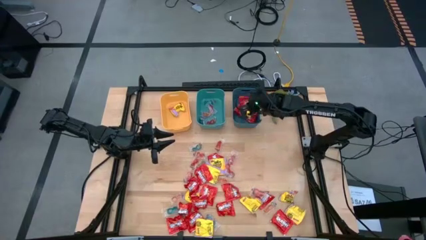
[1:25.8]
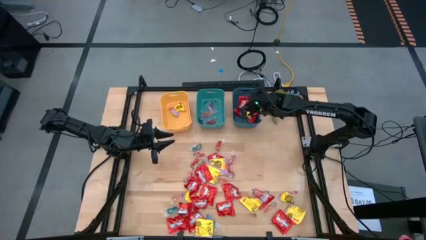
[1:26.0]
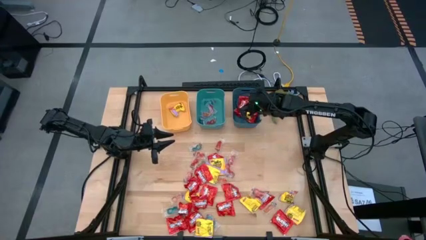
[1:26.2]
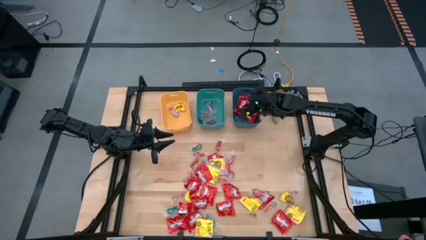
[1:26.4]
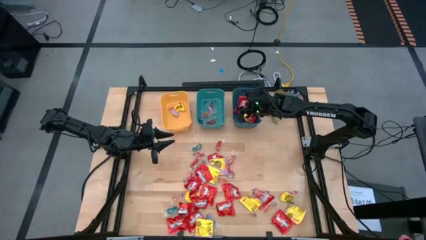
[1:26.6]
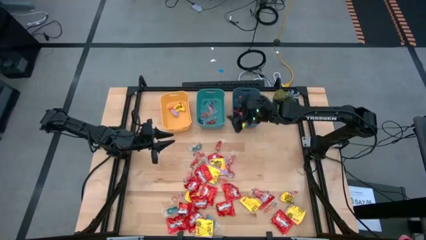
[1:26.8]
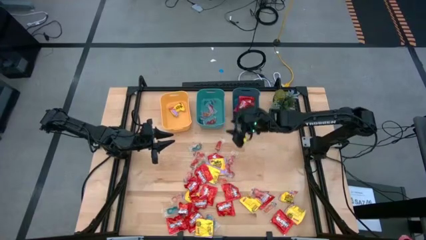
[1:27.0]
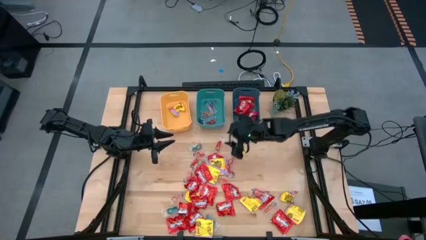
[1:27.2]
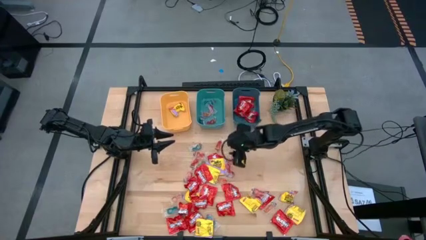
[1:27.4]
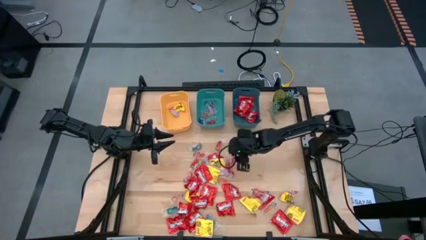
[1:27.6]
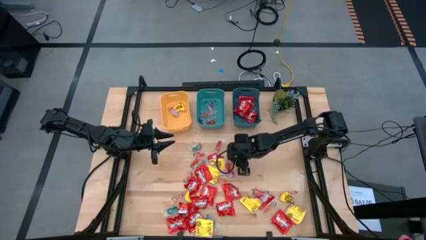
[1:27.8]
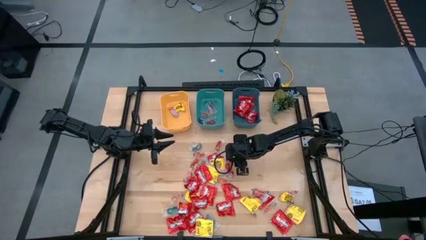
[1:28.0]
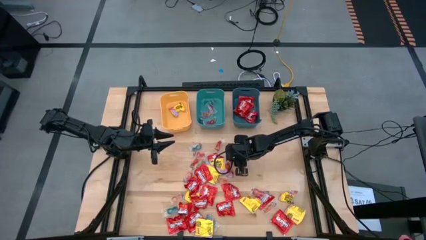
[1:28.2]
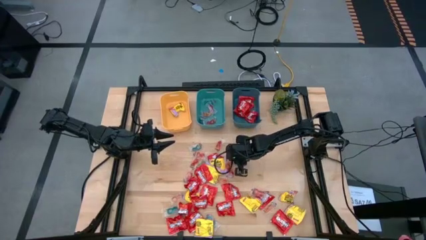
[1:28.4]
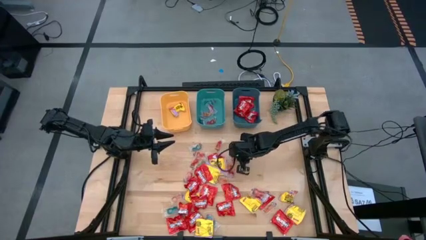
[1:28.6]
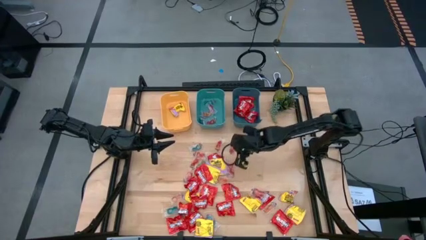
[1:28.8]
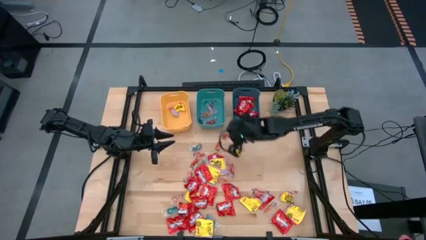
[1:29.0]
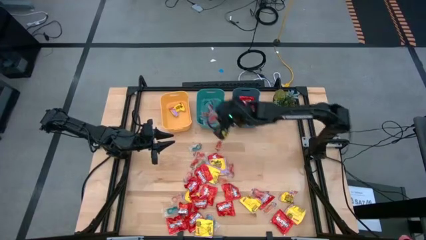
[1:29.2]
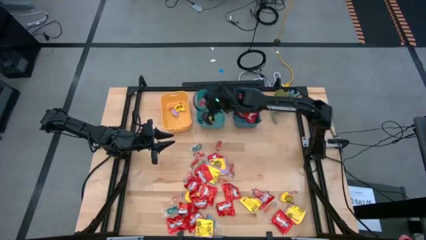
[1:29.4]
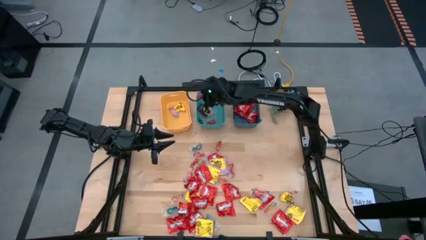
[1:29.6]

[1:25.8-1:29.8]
Task: Sort candy
Put the orange gummy candy into the green bin

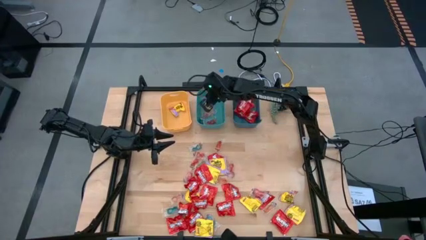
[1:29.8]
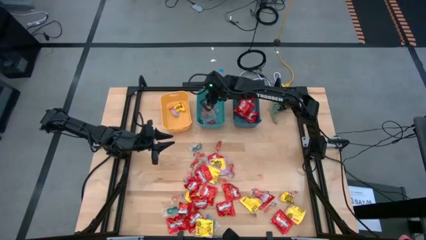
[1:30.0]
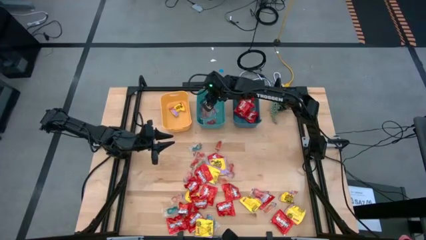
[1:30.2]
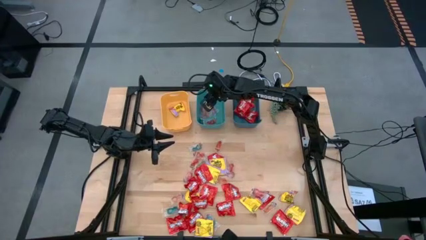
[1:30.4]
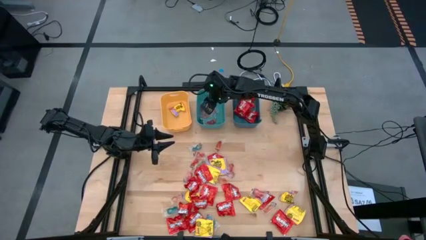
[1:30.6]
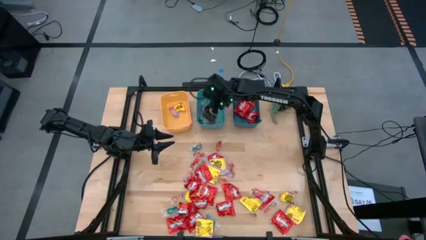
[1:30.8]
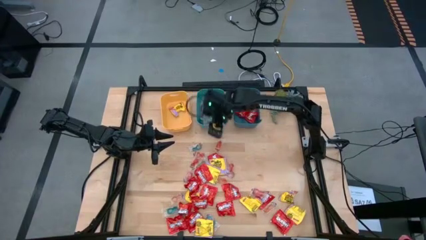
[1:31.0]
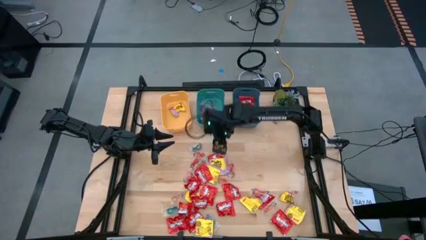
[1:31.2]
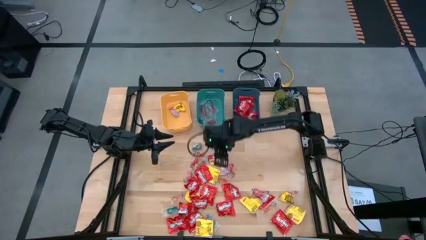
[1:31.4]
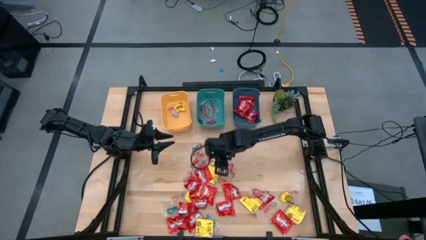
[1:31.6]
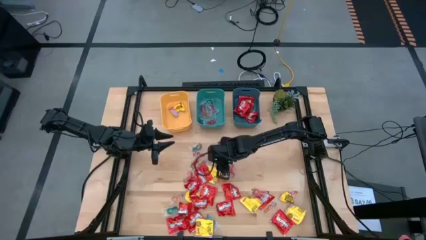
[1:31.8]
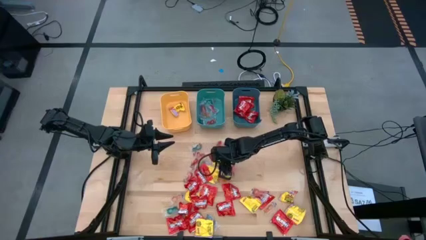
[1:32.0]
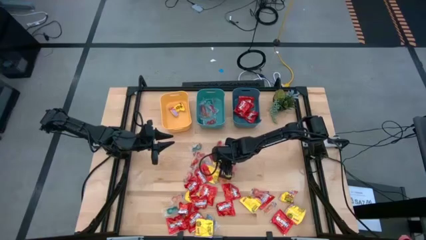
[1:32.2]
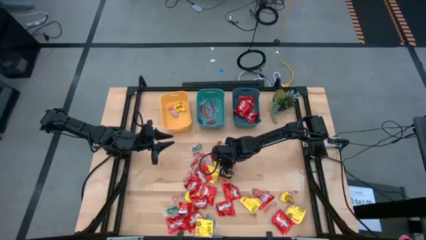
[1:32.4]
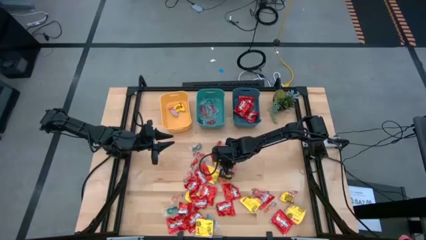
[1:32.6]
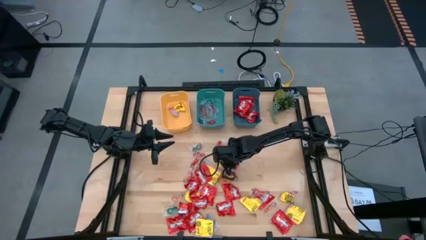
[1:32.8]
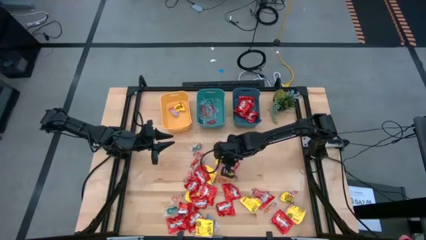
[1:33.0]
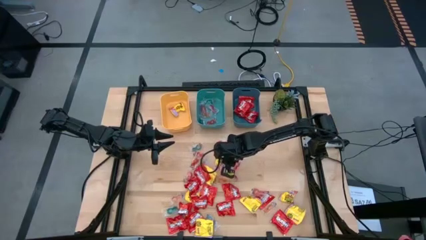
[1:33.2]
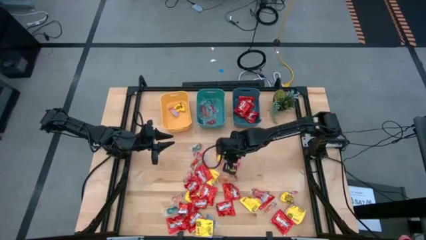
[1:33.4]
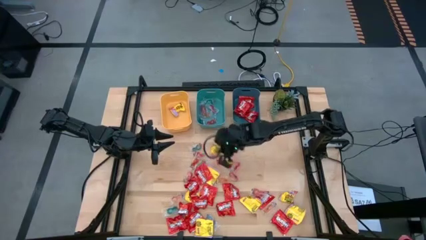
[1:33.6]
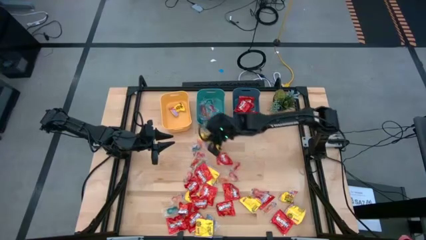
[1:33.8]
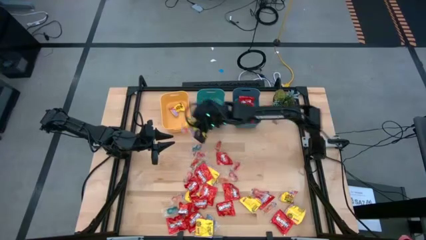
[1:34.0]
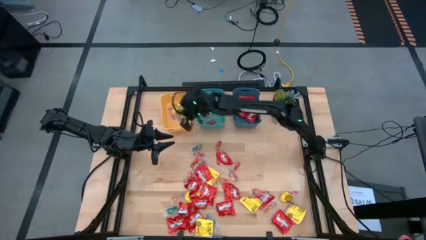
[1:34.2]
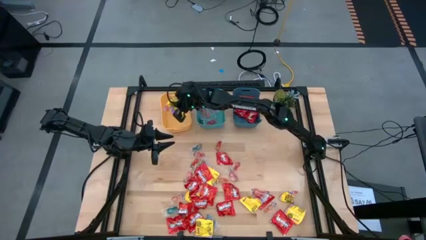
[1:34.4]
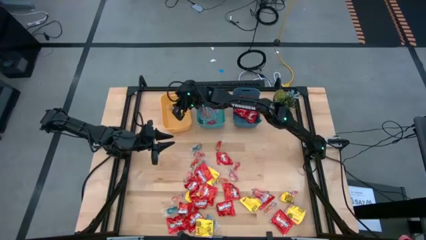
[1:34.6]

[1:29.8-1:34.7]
Put the yellow candy into the yellow bin

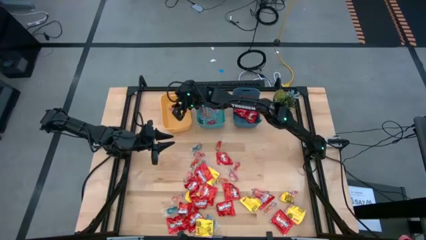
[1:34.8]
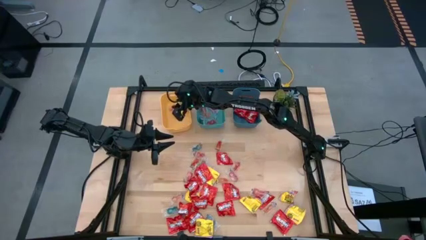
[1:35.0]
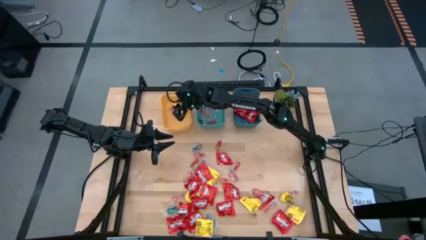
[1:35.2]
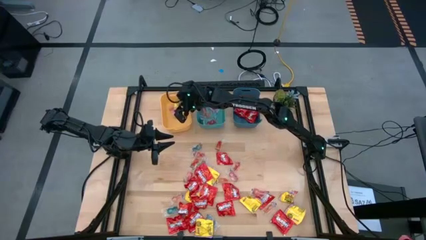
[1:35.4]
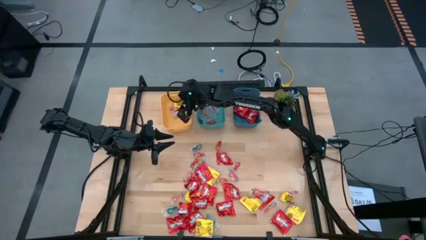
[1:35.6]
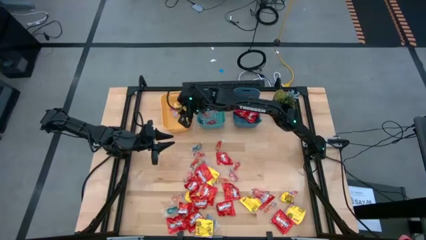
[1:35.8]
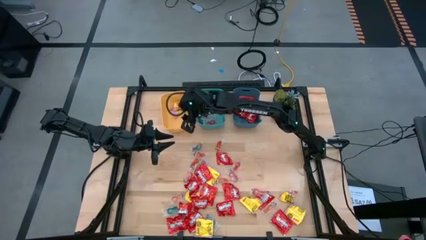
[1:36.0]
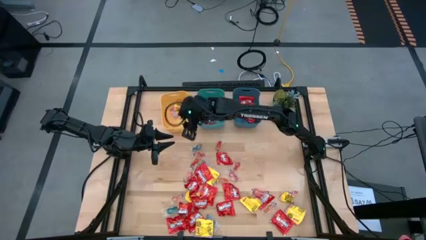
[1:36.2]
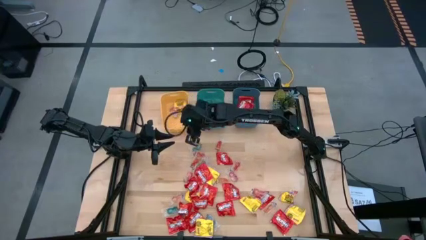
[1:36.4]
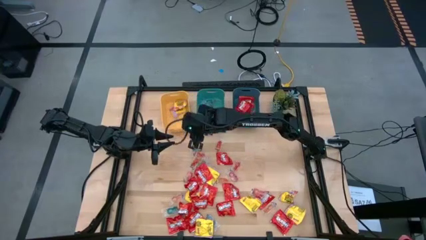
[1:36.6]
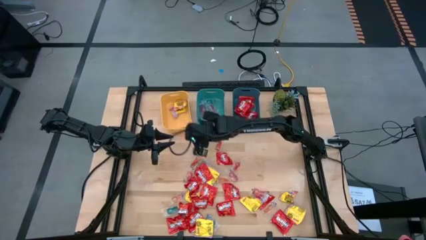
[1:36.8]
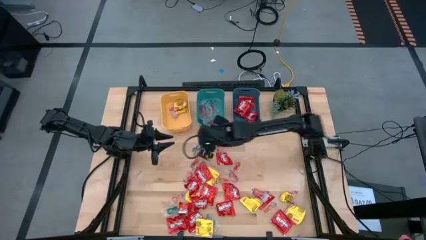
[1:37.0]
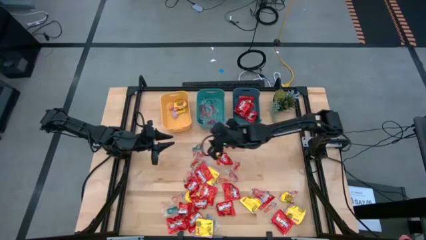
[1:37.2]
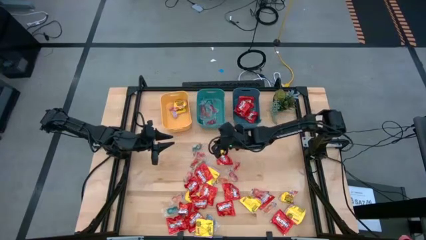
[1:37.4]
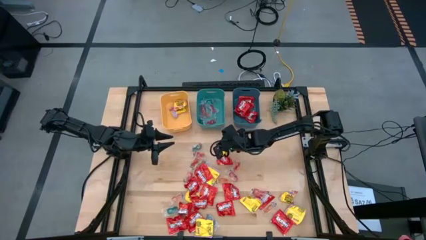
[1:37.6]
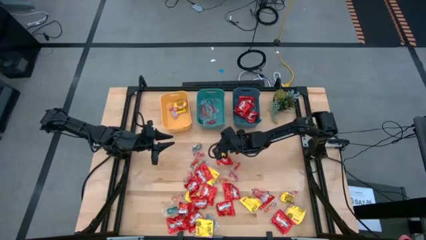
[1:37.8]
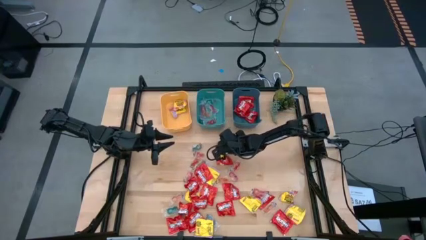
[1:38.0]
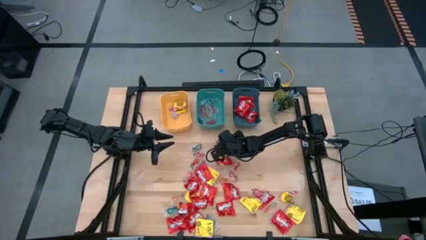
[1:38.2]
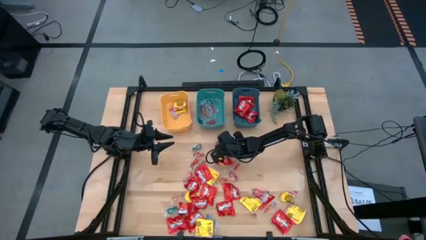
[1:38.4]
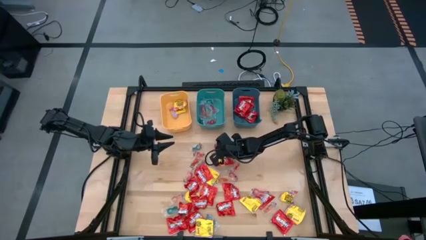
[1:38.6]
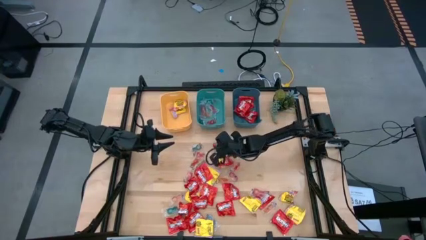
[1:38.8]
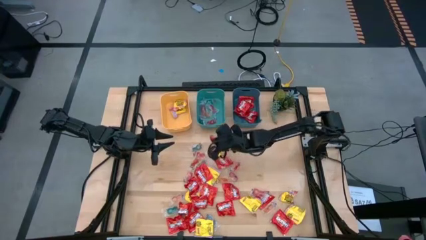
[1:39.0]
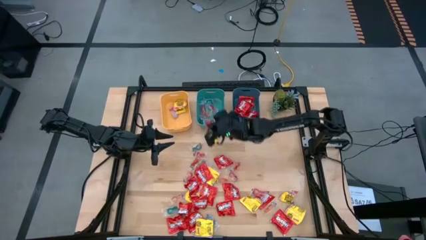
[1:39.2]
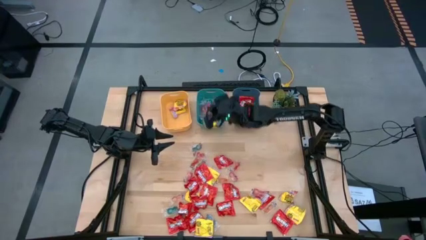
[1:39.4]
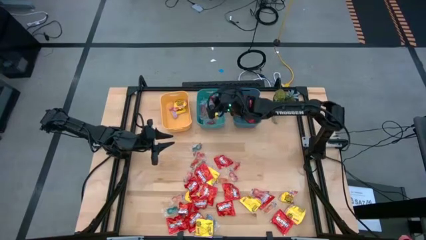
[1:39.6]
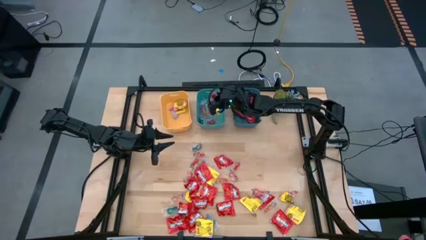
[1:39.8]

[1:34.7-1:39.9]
Put the orange gummy candy into the green bin

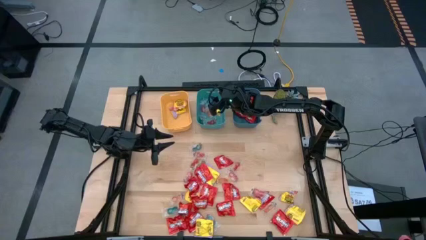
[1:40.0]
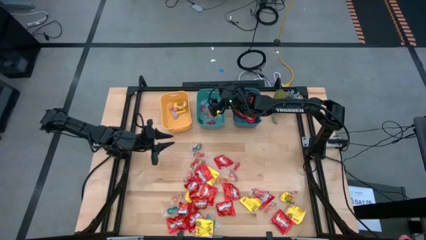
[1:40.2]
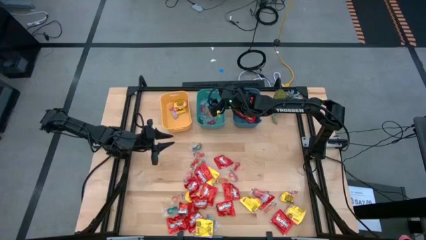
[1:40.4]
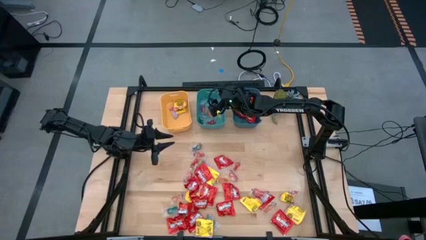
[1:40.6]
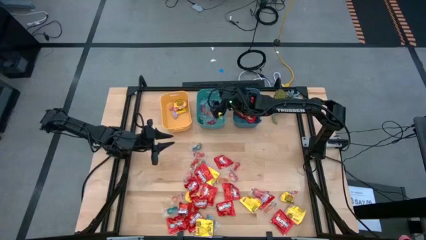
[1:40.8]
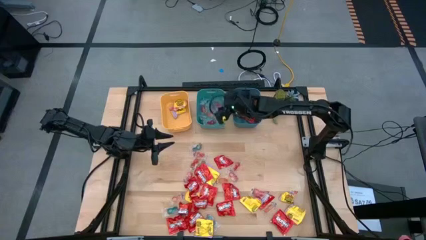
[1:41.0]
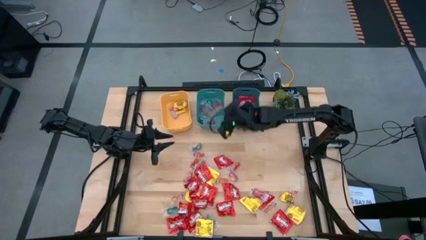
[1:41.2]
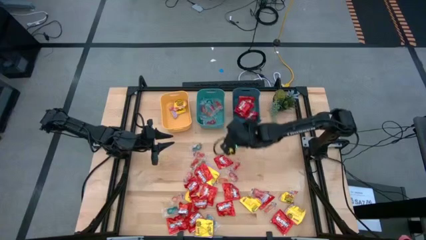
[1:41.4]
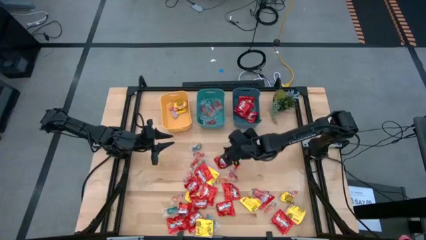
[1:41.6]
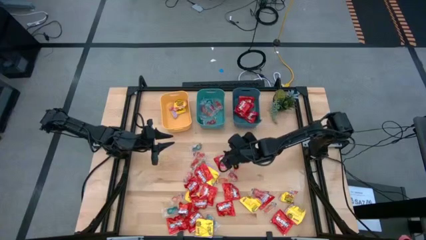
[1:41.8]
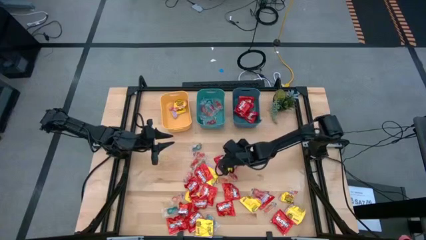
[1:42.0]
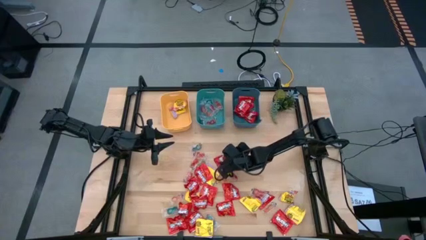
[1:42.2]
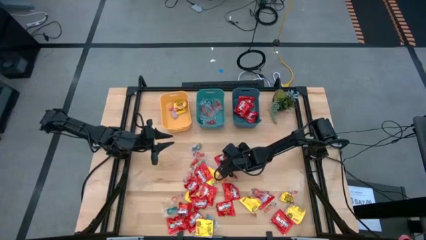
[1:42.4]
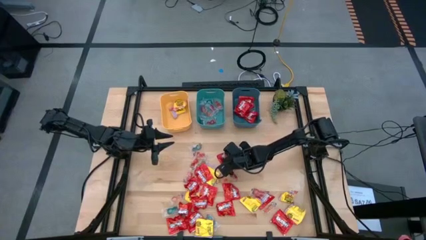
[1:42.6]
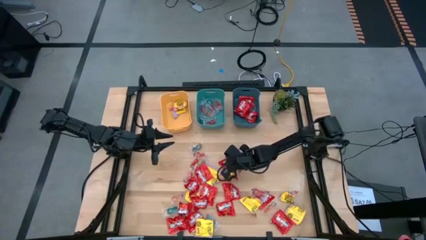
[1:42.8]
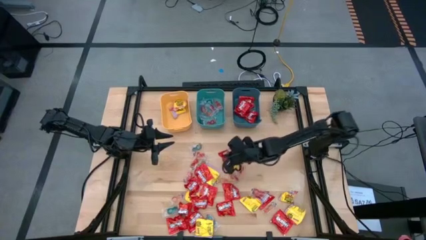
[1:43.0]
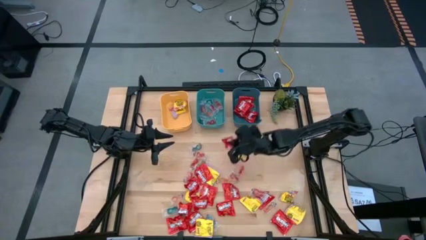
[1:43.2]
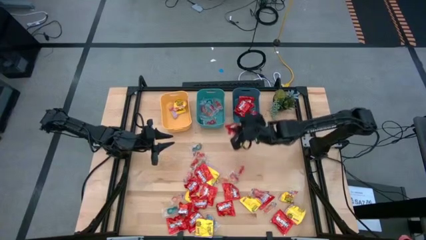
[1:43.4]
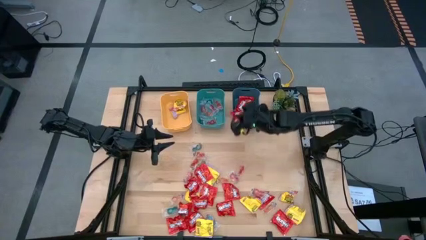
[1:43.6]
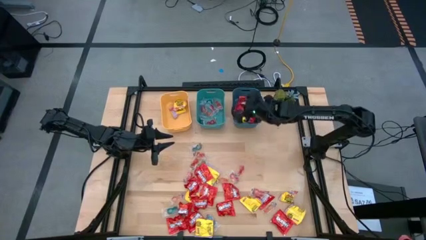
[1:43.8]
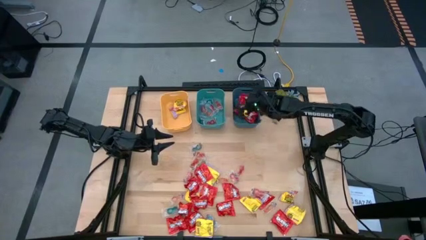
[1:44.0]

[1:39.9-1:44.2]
Put the red candy into the blue bin
